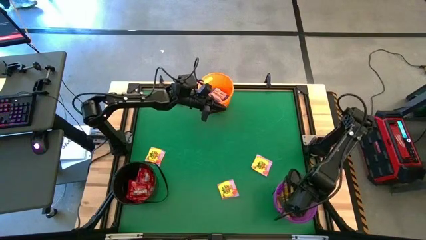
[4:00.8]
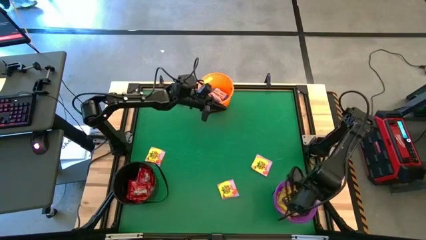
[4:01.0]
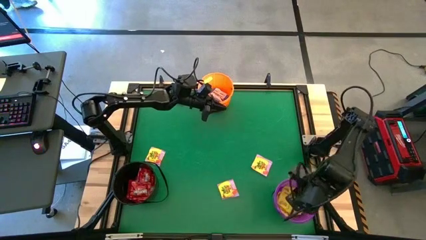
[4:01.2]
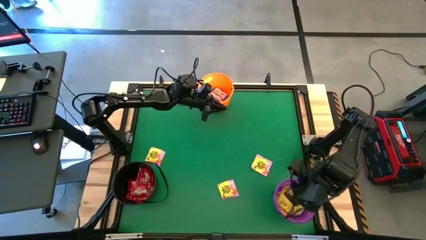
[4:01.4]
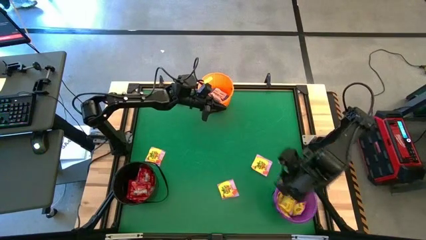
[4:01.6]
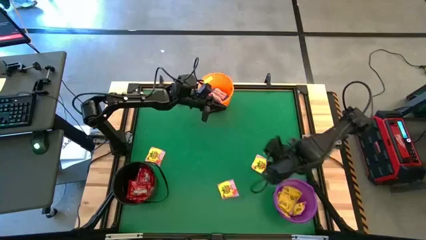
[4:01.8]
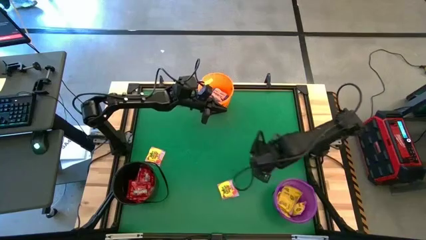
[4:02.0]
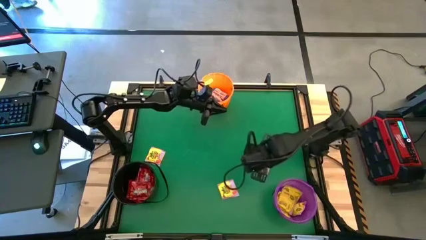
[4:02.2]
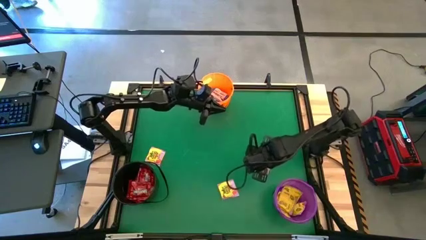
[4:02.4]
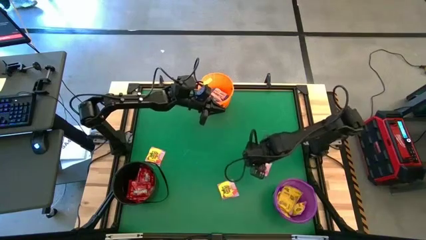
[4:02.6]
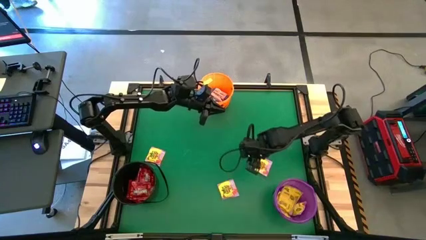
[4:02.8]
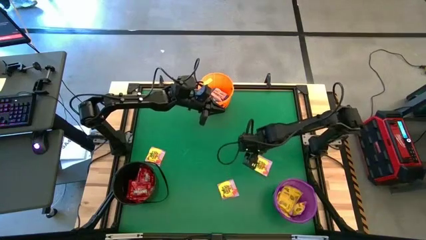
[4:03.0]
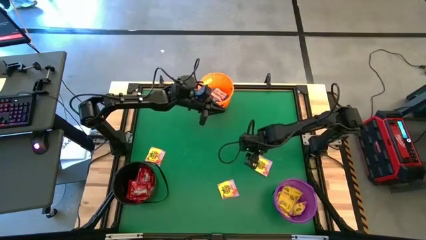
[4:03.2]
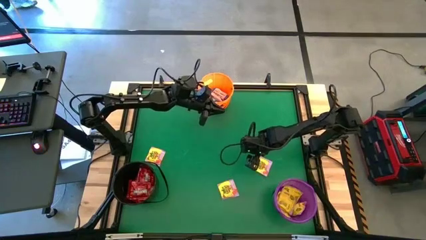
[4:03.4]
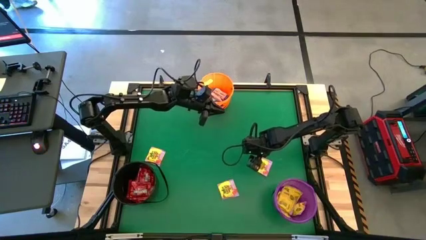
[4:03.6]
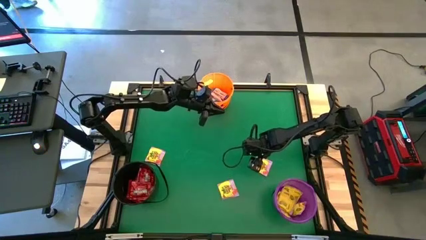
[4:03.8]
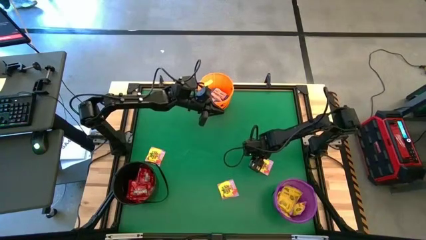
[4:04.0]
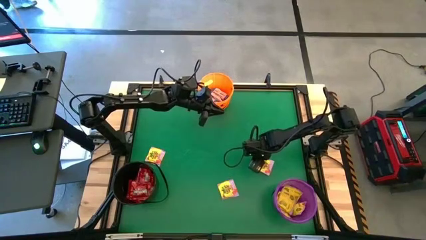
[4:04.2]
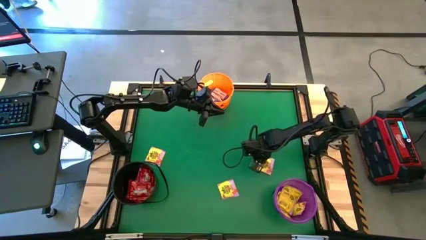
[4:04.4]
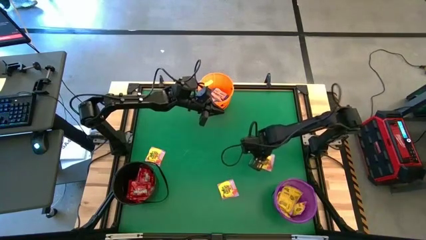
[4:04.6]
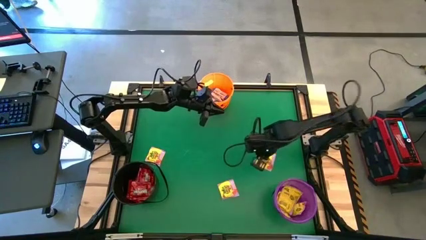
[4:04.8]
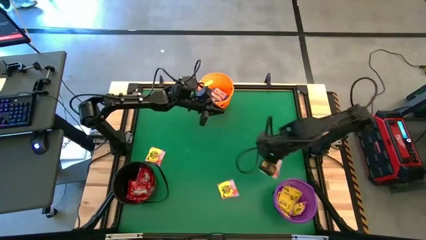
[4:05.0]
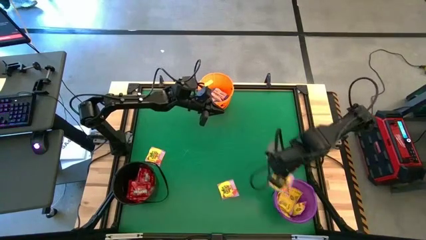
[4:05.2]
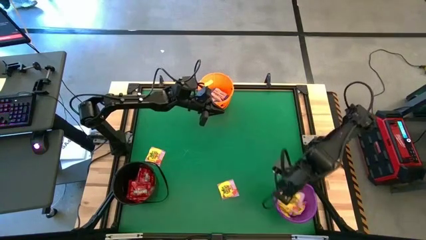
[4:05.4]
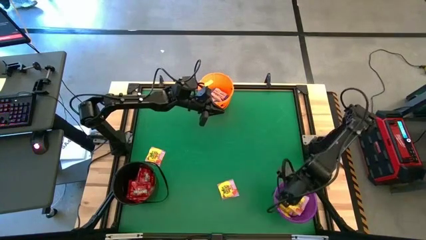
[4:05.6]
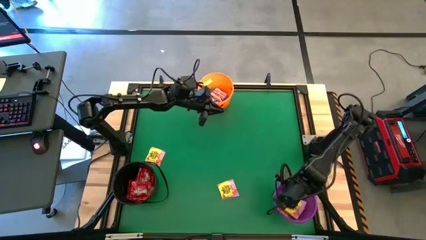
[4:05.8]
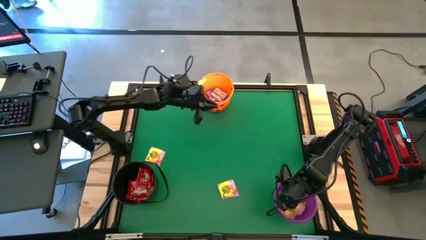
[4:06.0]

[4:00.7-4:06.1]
Task: Sort candy by brand, put in halloween buckets
Put the yellow candy into the purple bucket

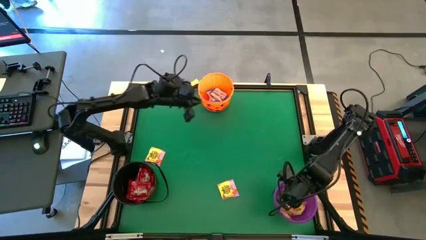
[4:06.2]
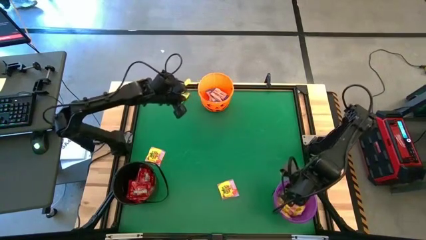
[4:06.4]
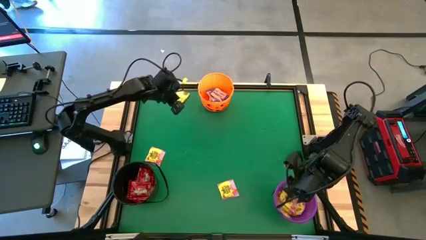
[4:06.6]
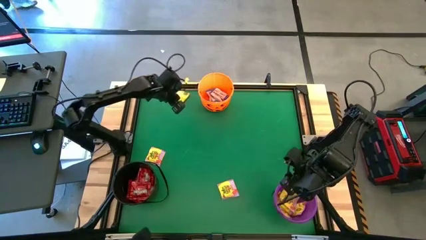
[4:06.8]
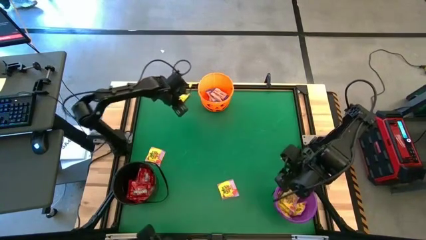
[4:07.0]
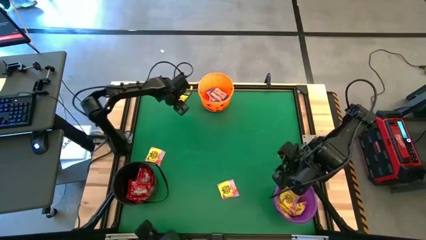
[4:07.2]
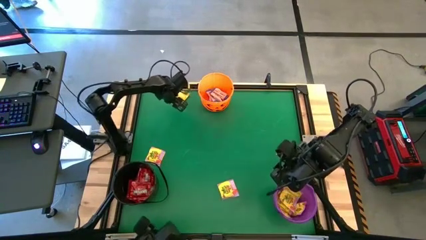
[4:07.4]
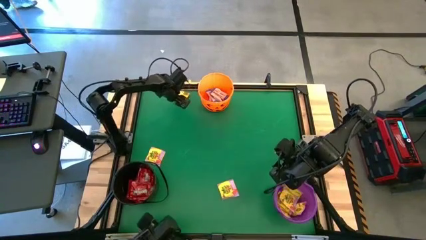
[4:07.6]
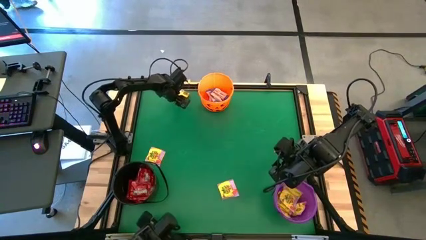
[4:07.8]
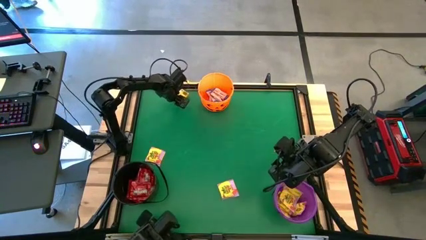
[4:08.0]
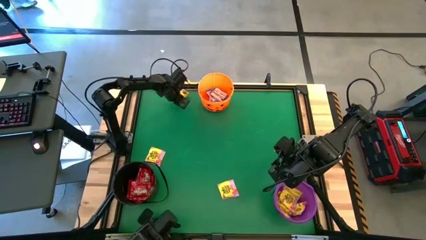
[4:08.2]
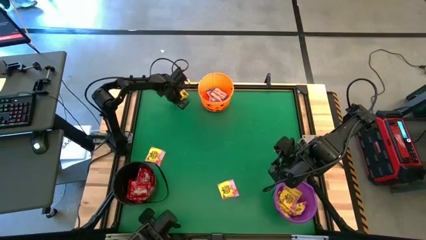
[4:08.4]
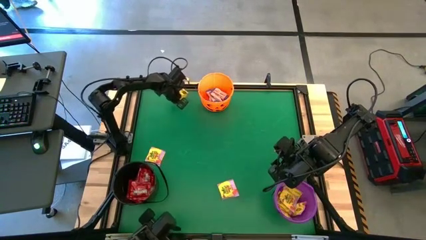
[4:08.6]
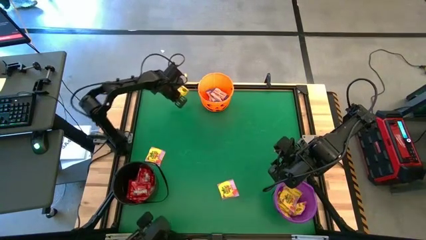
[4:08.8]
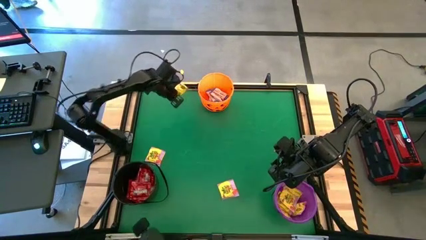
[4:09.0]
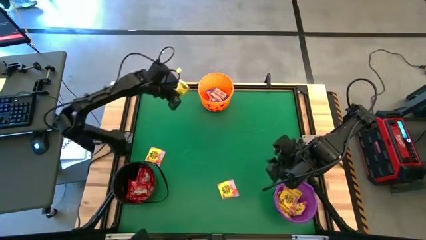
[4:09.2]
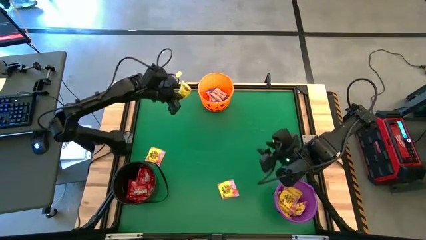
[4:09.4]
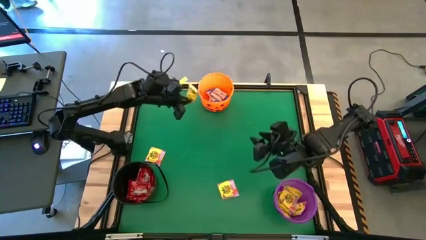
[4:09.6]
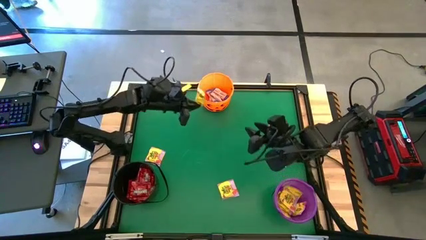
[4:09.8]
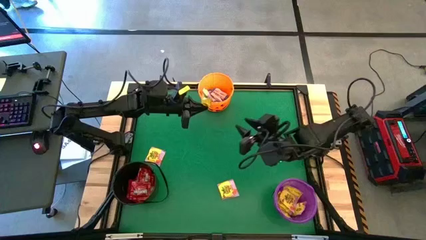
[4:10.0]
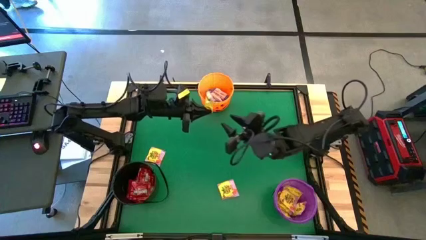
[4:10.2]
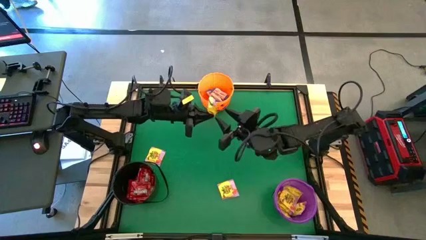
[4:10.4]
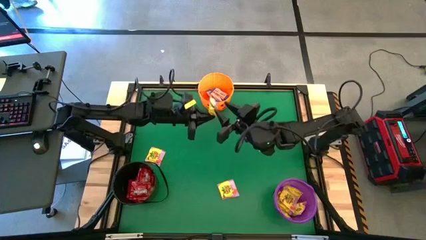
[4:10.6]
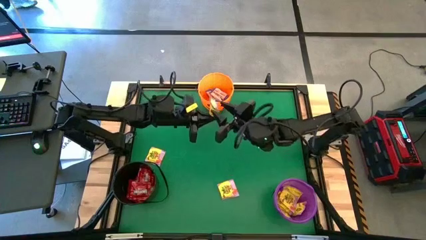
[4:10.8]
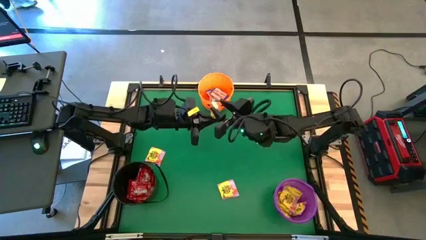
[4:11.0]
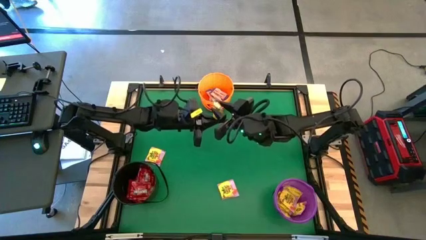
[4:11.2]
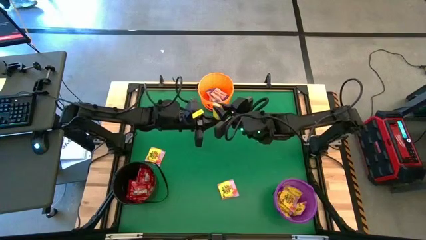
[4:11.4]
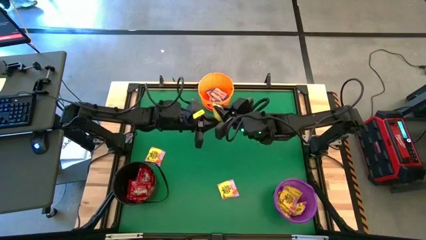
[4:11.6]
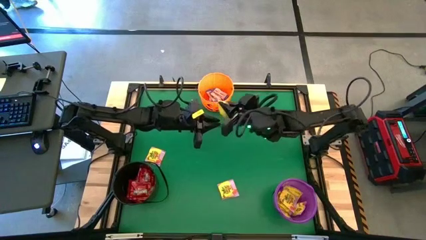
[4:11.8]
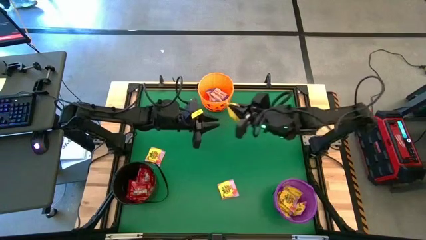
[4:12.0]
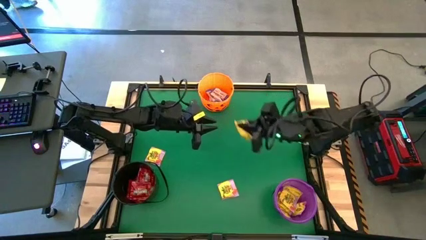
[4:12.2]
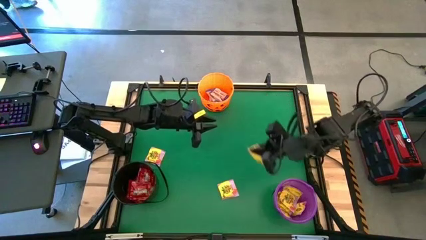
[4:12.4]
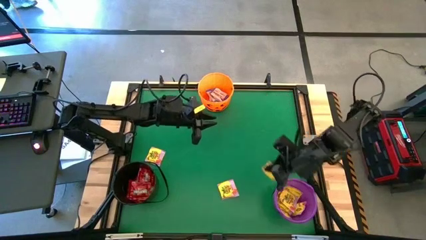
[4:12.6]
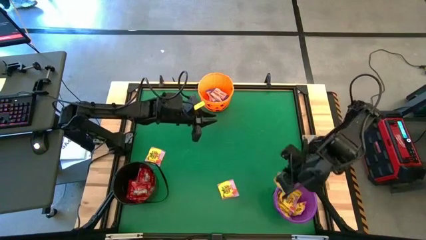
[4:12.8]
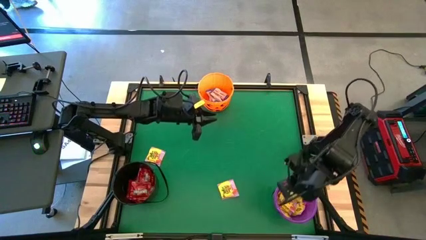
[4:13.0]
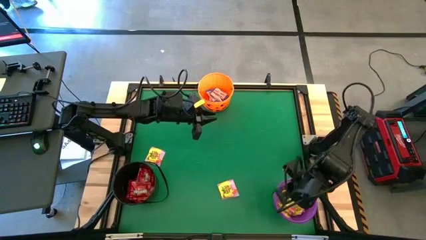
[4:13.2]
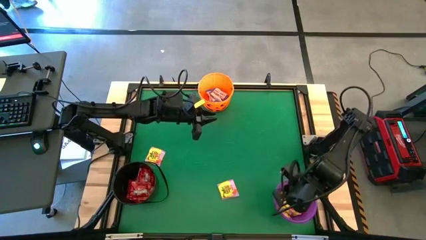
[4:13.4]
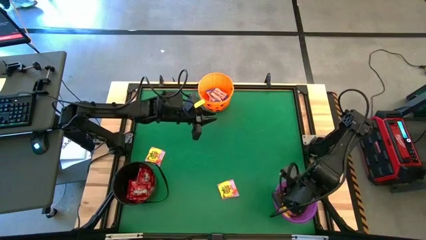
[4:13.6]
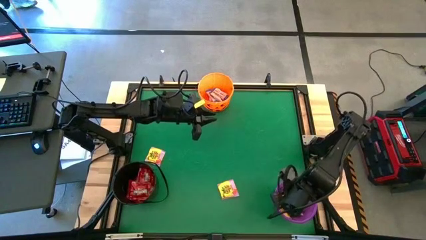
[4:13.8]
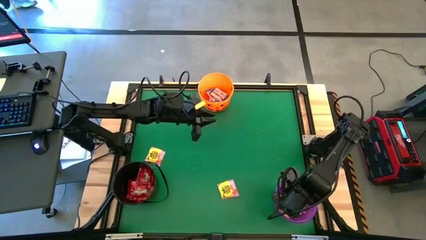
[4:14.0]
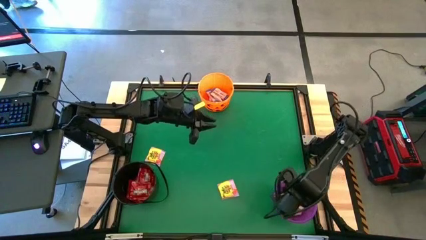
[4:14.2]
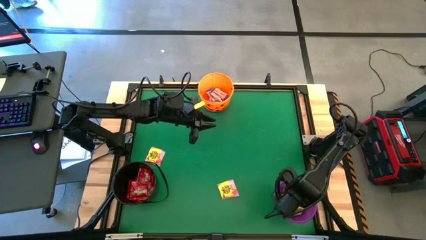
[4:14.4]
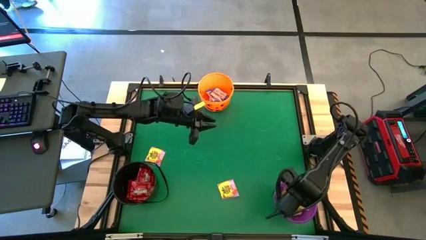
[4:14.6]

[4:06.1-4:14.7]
Put the yellow candy into the purple bucket

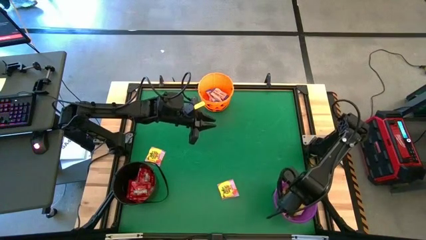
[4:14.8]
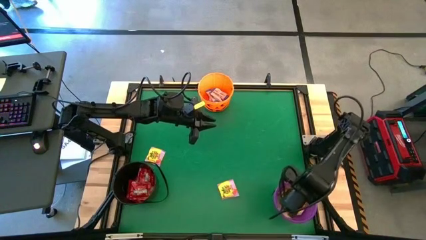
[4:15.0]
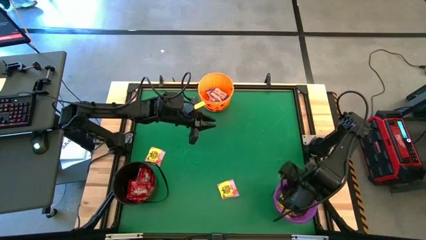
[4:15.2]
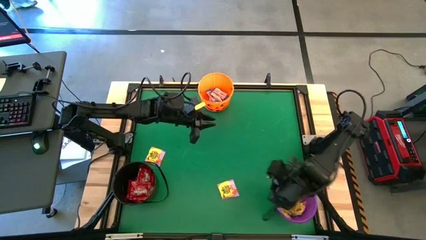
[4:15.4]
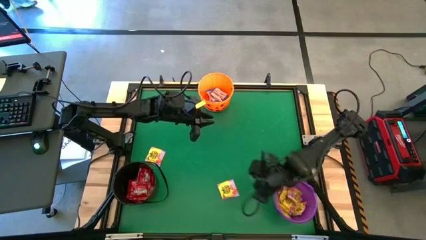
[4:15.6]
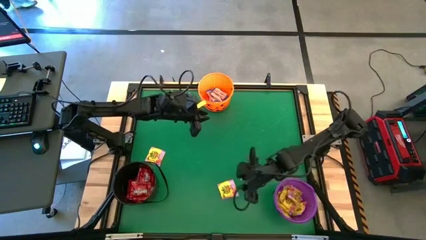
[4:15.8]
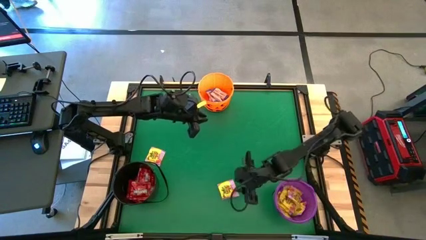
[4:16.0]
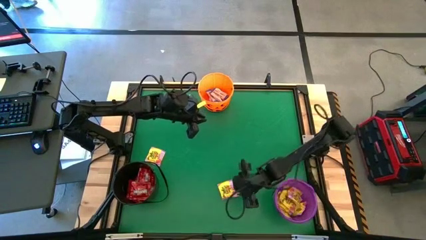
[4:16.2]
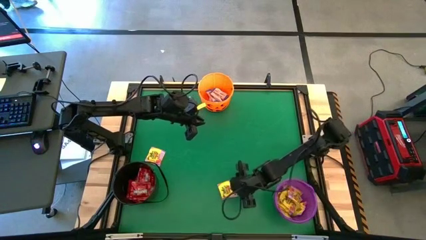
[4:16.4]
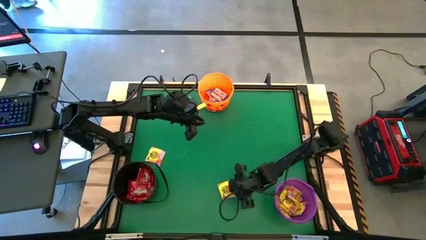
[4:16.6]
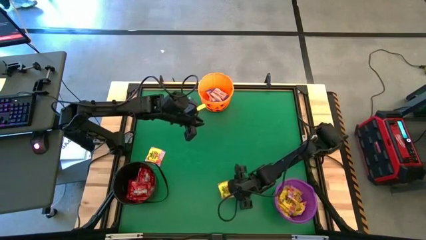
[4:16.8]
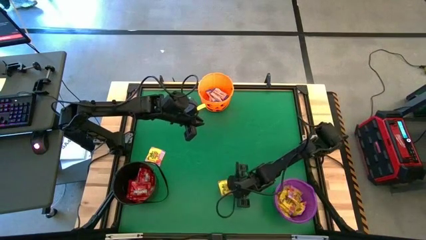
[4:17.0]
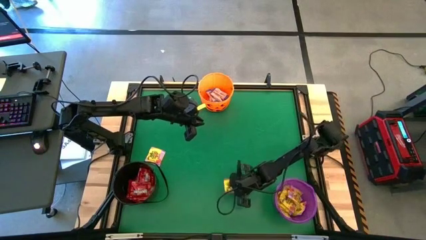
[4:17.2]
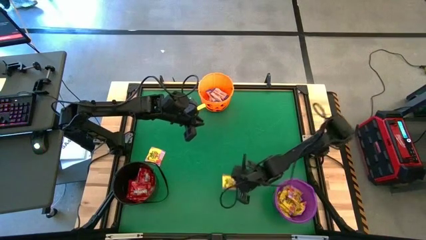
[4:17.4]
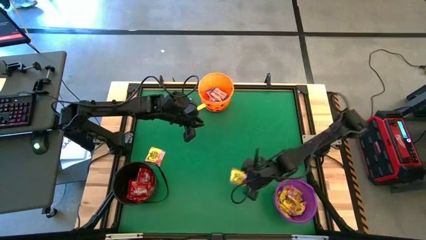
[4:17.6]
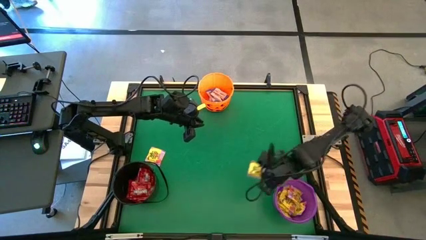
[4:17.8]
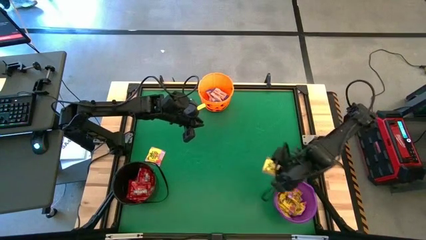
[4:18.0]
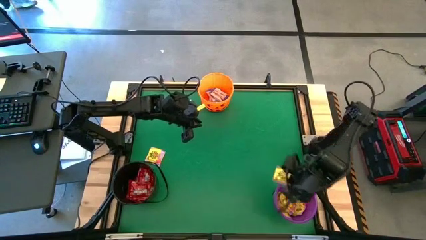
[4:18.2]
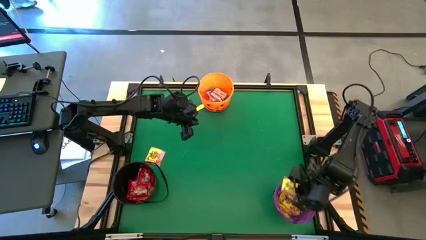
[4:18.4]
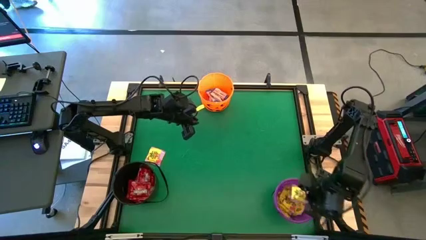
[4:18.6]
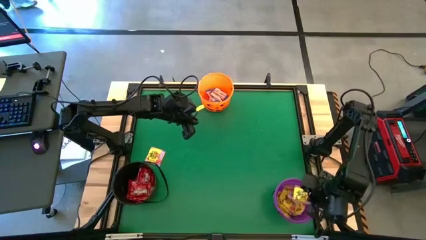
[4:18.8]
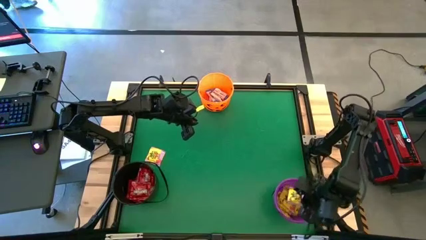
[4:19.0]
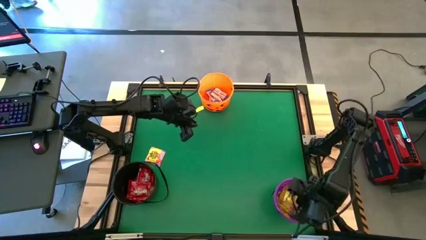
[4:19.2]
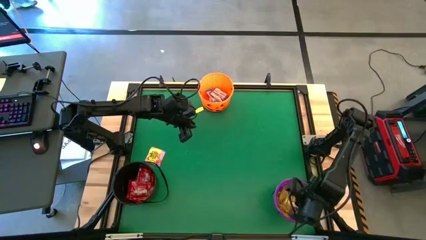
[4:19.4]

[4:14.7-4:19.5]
Put the yellow candy into the purple bucket
